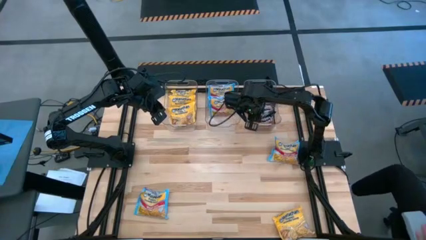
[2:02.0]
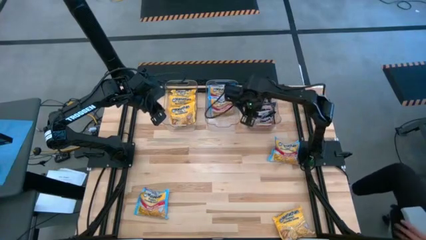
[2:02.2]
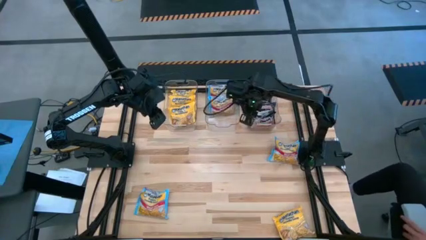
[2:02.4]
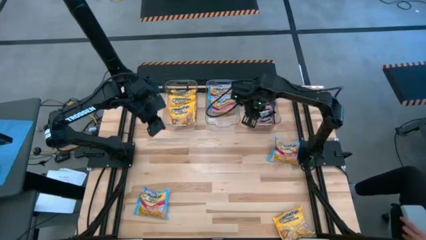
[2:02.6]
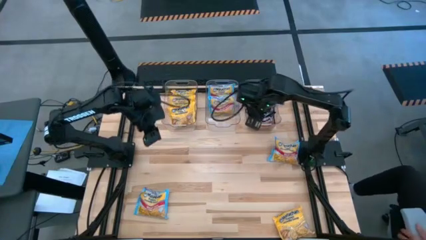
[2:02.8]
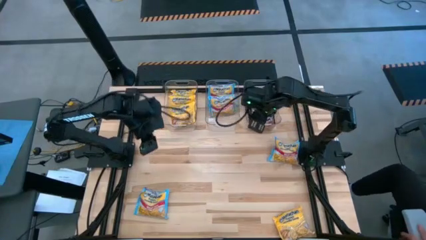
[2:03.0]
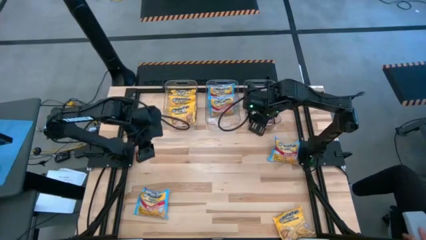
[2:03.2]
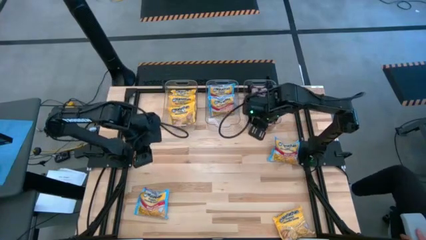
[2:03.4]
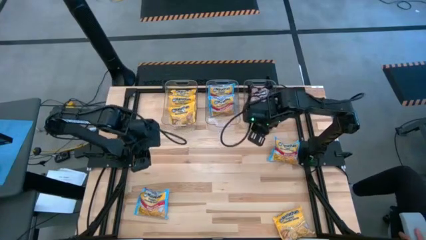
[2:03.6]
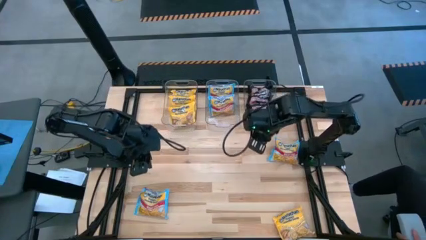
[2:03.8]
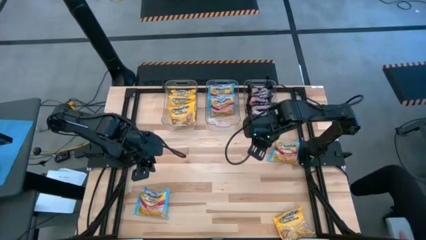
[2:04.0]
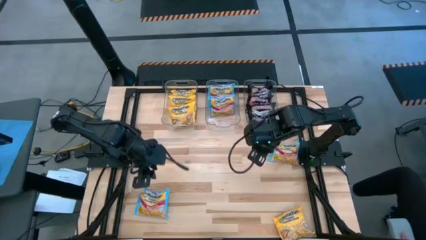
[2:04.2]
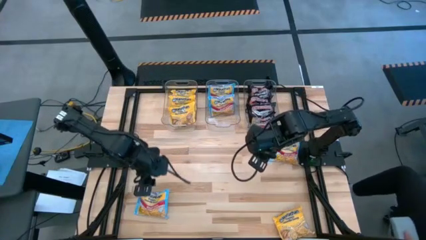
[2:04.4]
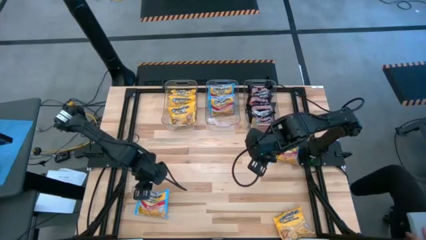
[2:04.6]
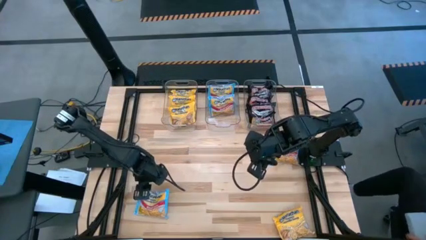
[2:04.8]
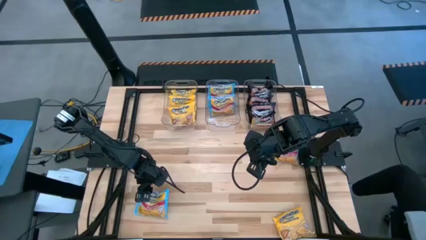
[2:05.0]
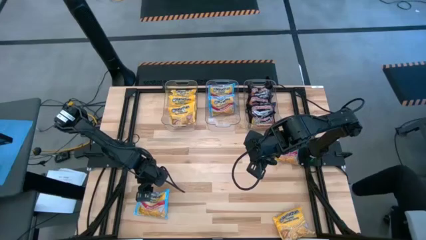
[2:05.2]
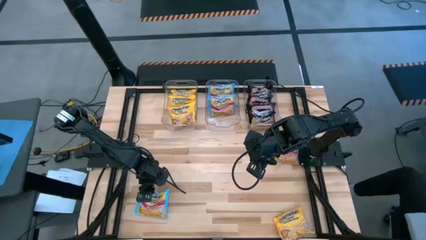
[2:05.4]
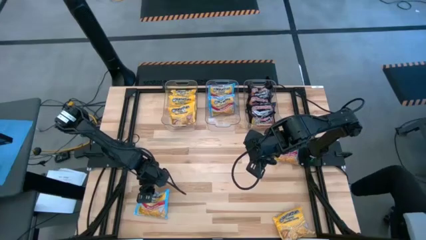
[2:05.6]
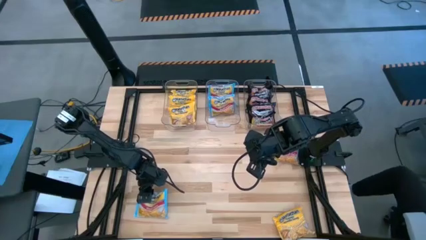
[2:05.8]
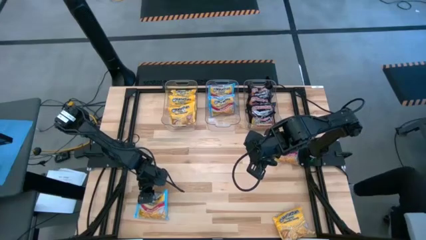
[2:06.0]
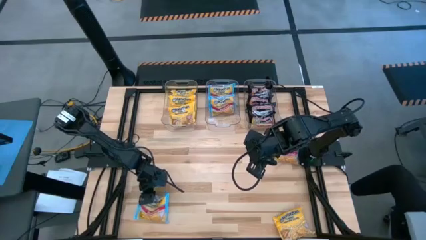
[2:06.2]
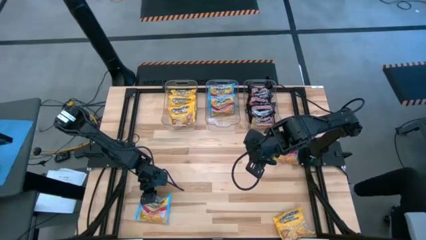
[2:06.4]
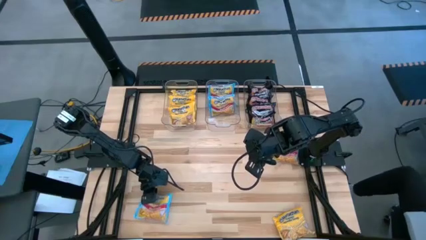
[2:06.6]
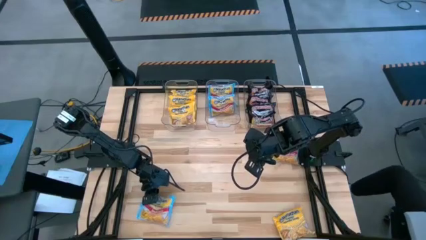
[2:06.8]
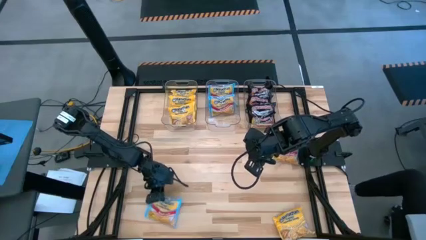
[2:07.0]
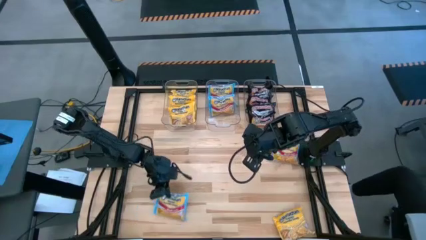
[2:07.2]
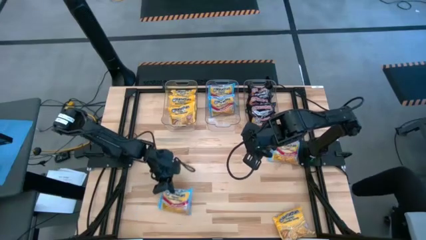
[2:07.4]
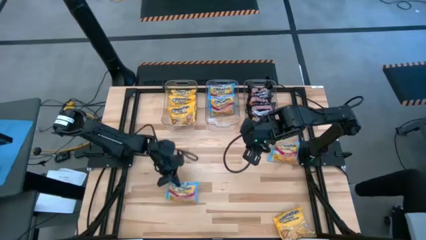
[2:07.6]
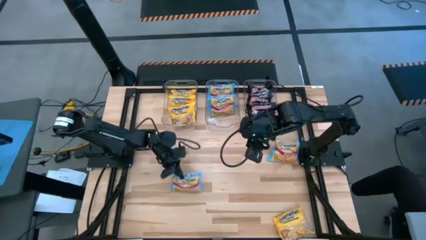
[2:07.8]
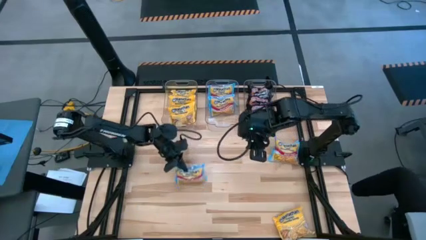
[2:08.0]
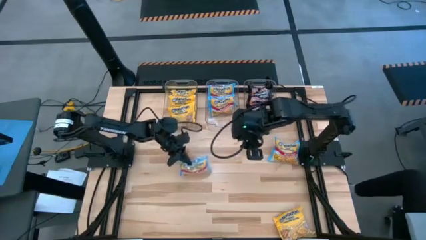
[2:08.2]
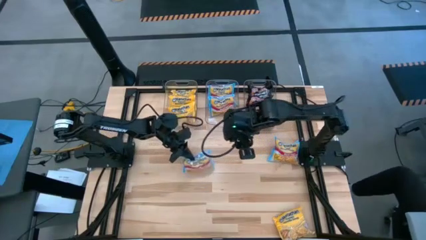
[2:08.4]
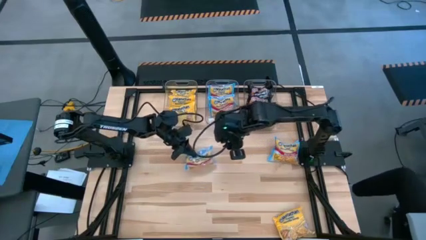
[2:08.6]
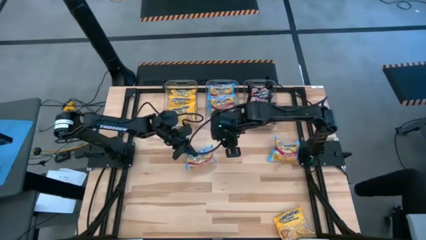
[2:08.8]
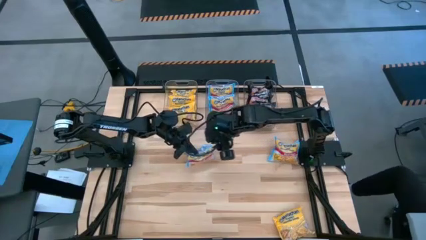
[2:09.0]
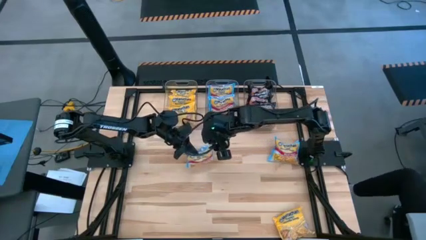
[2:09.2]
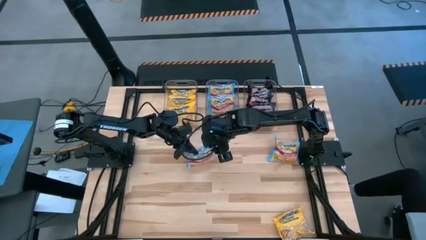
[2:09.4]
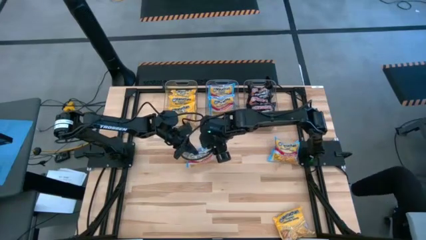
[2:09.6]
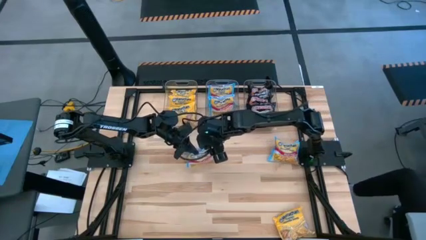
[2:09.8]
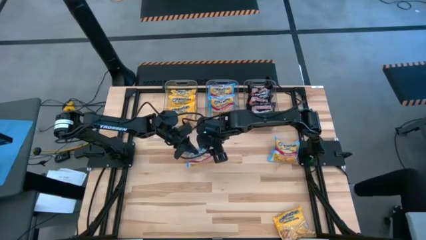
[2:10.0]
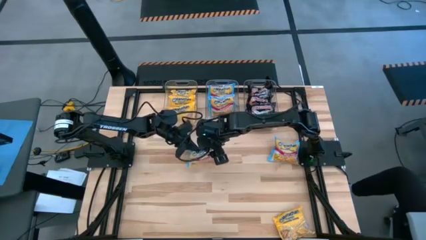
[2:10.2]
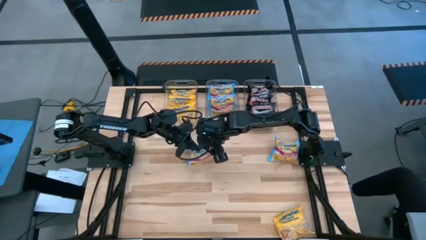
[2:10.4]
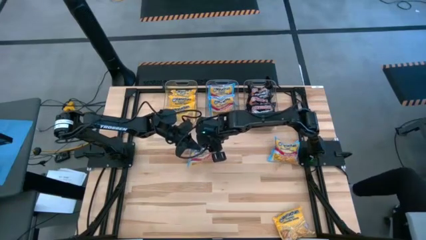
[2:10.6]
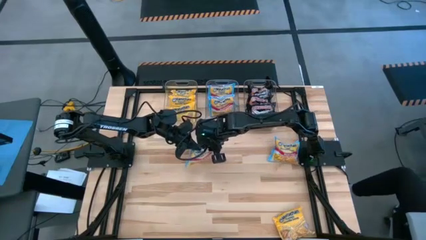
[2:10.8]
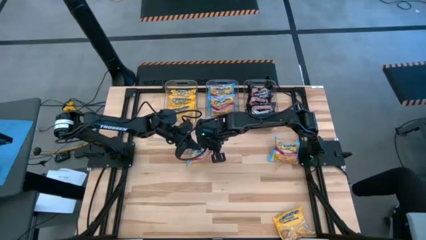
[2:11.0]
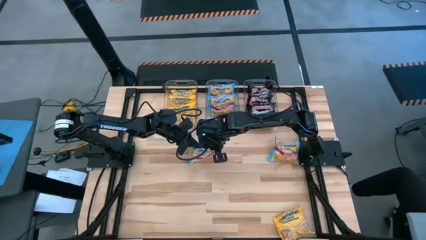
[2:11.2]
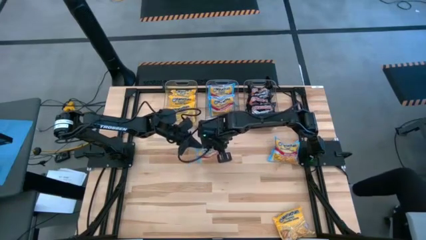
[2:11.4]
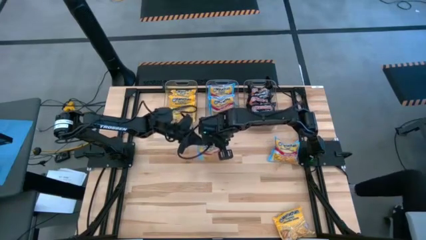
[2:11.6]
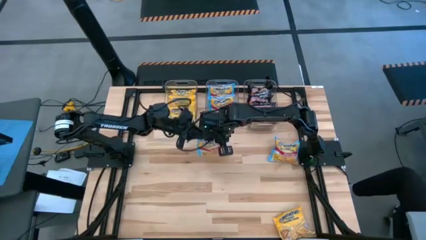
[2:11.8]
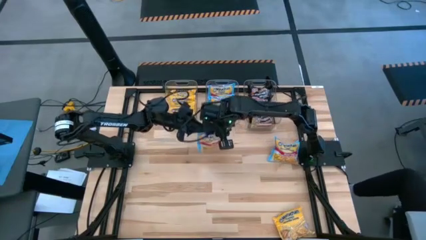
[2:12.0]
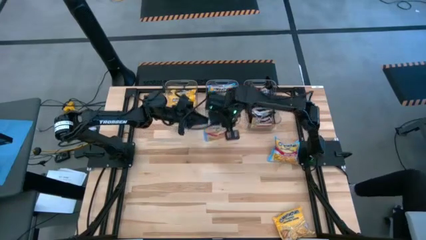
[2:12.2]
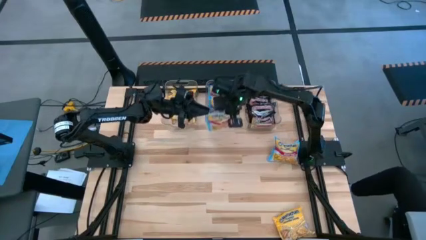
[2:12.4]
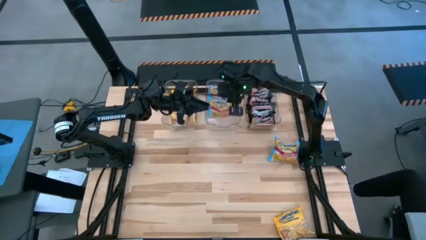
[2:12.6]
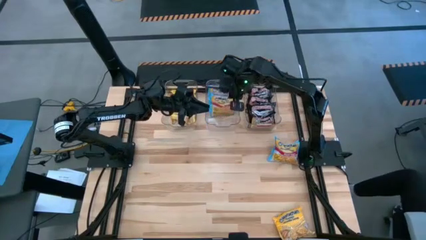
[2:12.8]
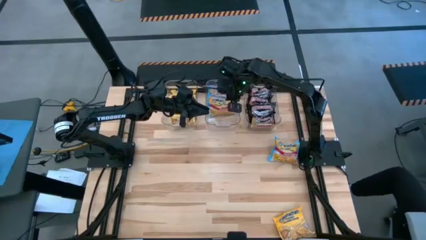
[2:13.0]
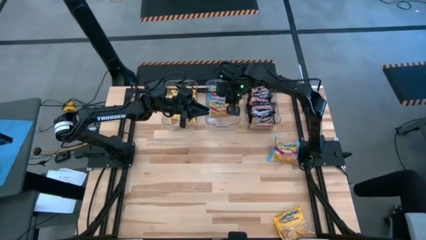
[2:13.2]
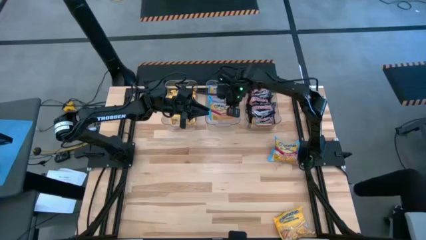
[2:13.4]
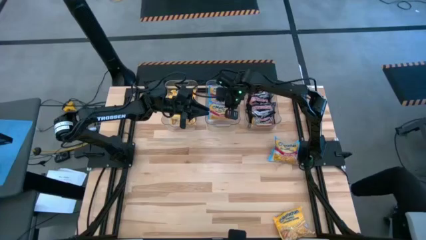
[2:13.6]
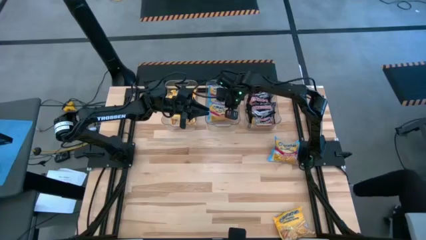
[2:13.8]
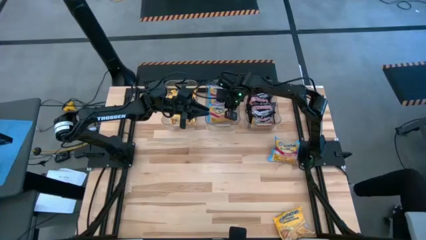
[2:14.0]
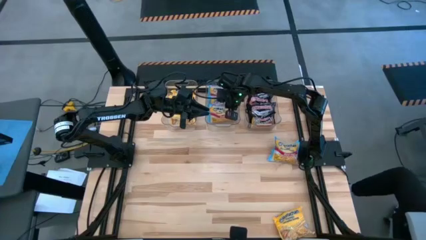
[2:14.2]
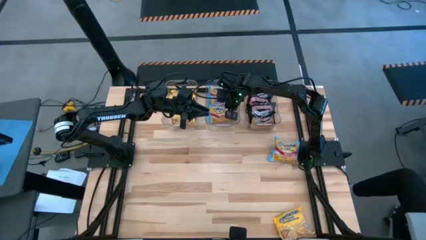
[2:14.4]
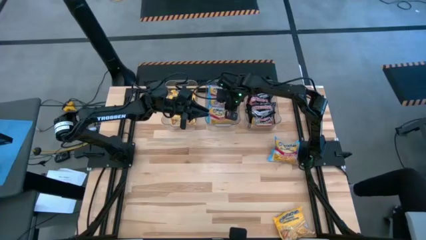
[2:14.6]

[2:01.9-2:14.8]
Task: Sort Maruchan noodles
Put the blue noodle pack into the center transparent bin

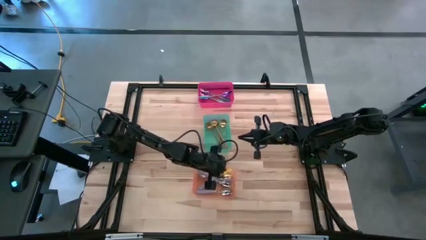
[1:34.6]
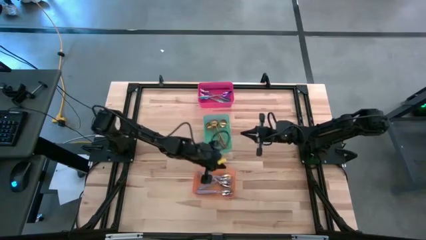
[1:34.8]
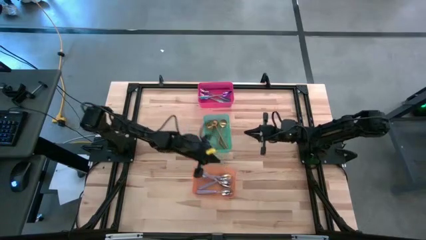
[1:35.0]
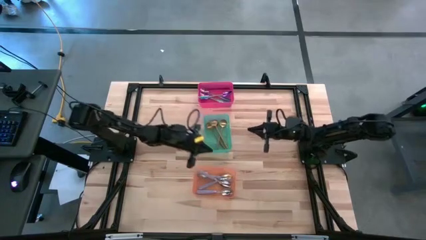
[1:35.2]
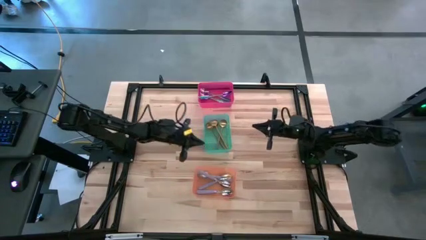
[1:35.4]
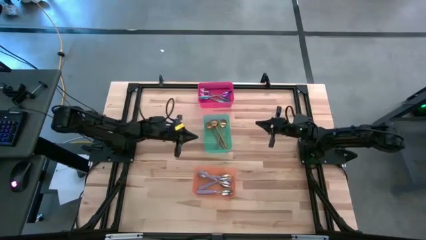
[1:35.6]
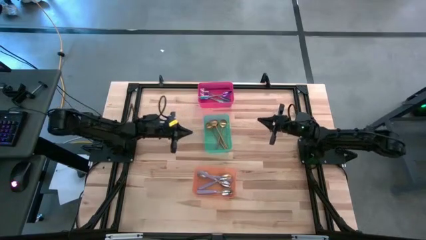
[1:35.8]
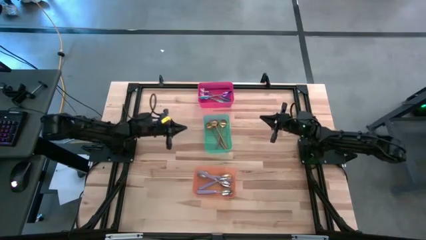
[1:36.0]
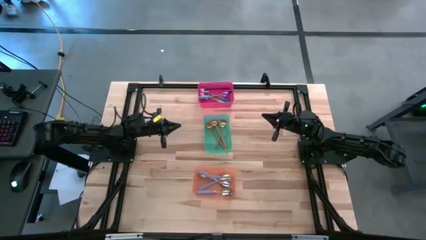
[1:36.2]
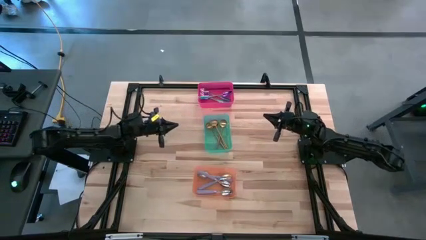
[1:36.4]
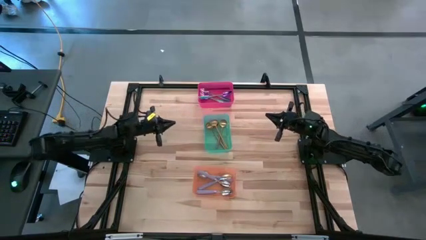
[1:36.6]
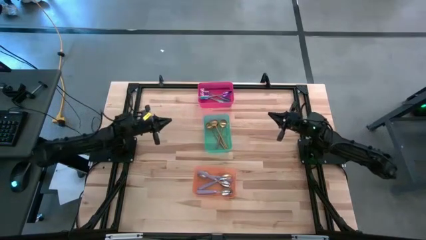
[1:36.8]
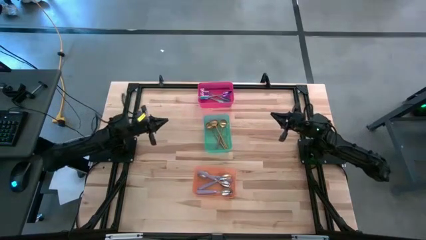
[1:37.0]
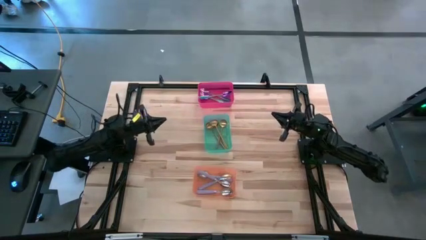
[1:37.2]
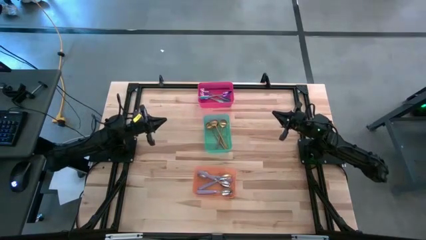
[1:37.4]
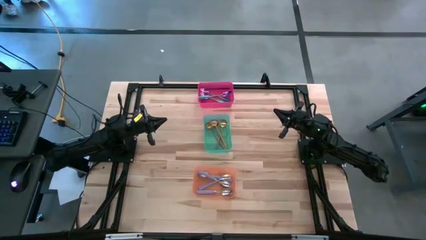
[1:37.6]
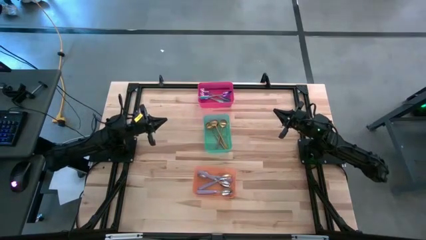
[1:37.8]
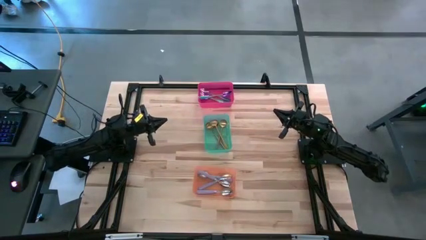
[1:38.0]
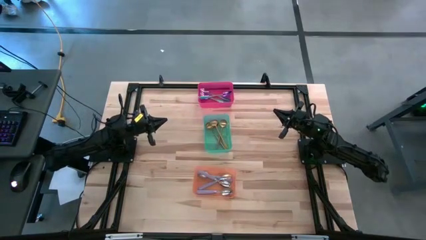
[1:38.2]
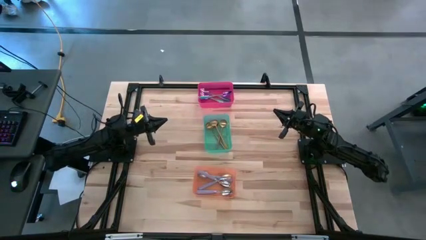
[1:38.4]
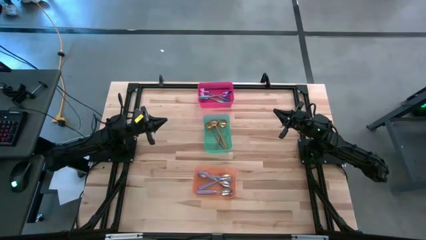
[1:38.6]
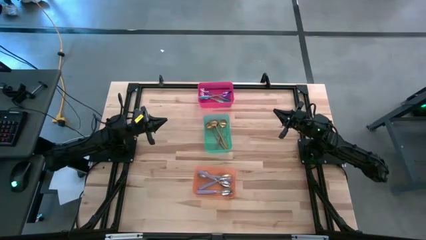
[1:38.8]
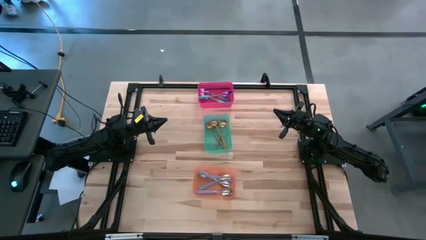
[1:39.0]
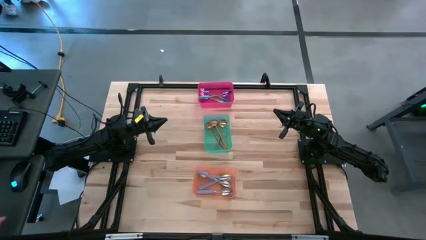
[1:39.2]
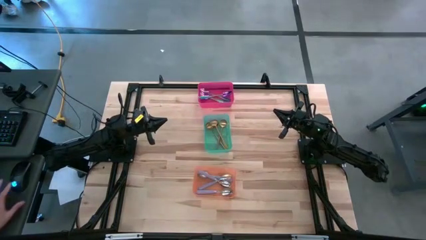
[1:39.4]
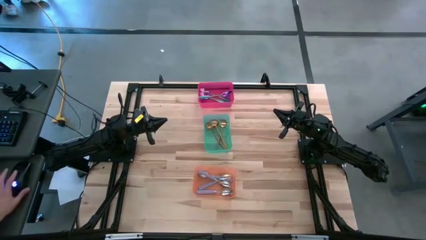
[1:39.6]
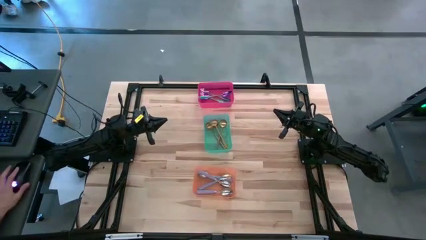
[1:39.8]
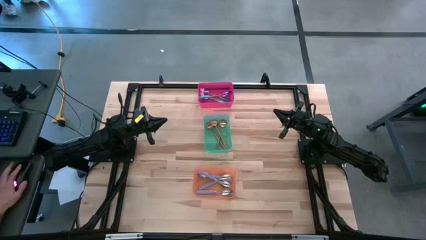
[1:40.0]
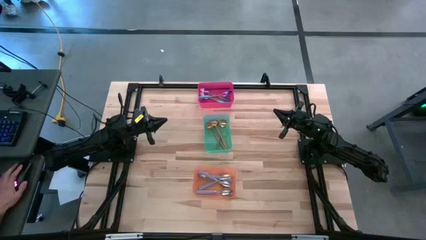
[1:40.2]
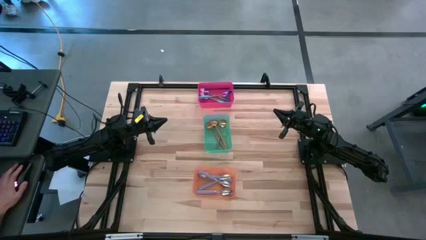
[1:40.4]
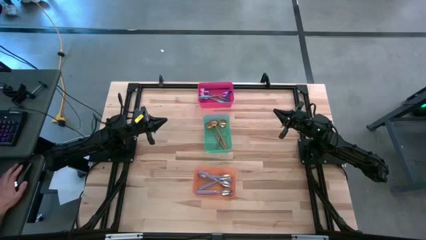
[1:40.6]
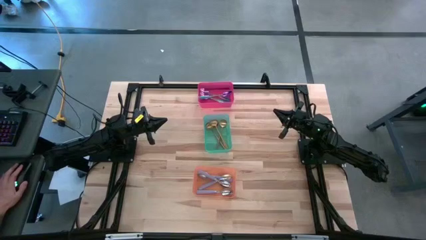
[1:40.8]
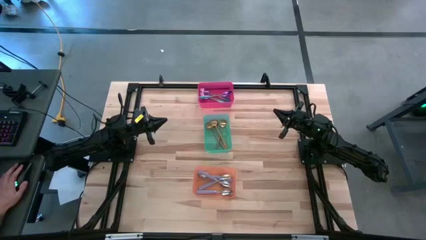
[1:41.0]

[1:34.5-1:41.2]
Task: Sort silverware by color (type)
Return to Home Position
